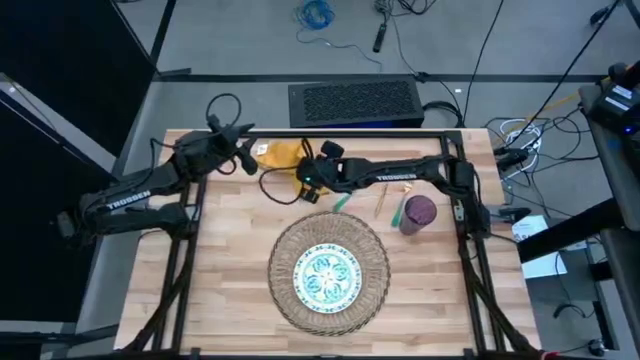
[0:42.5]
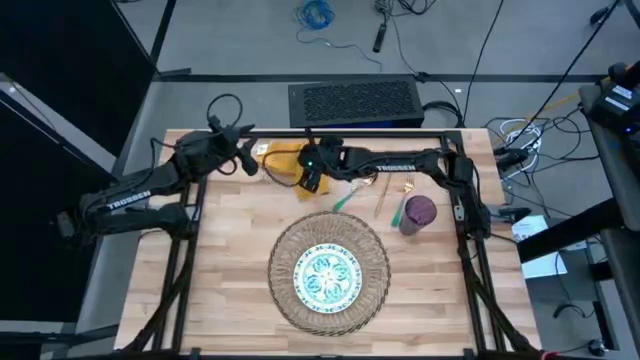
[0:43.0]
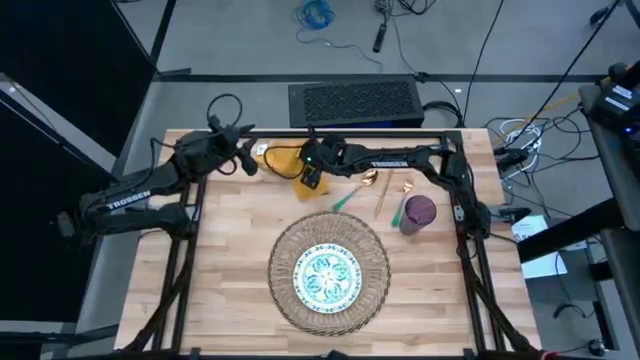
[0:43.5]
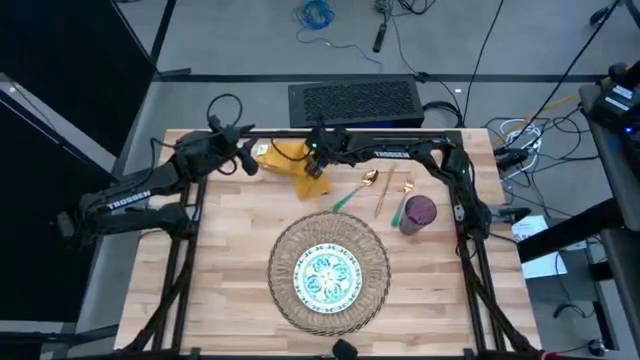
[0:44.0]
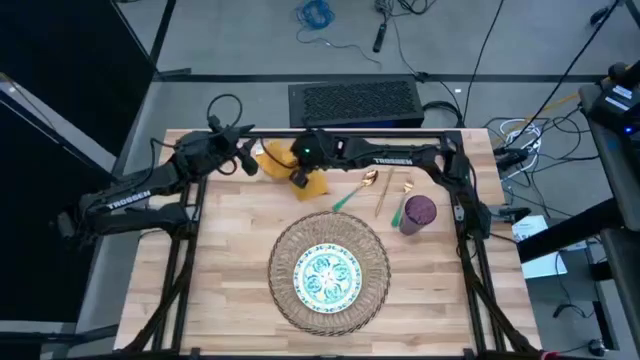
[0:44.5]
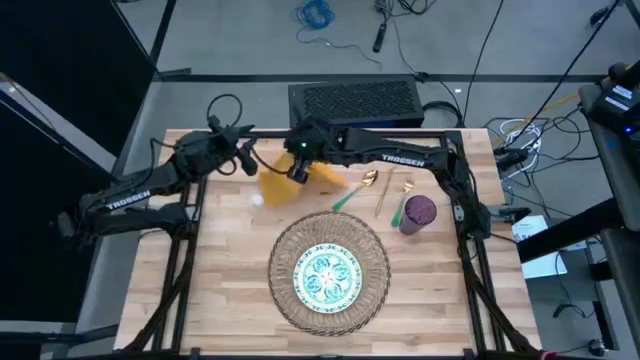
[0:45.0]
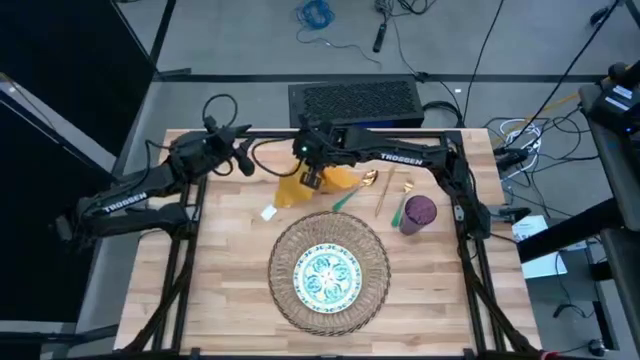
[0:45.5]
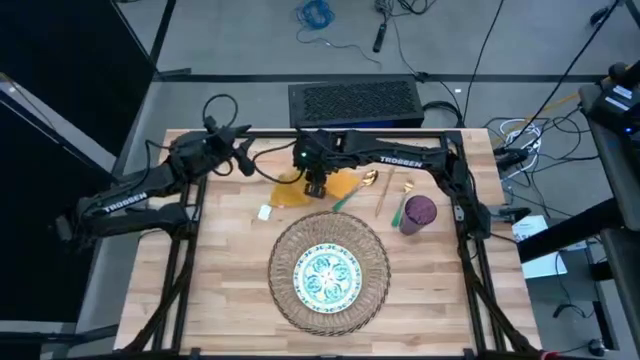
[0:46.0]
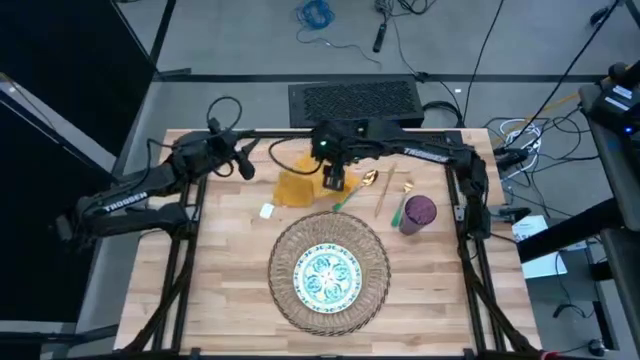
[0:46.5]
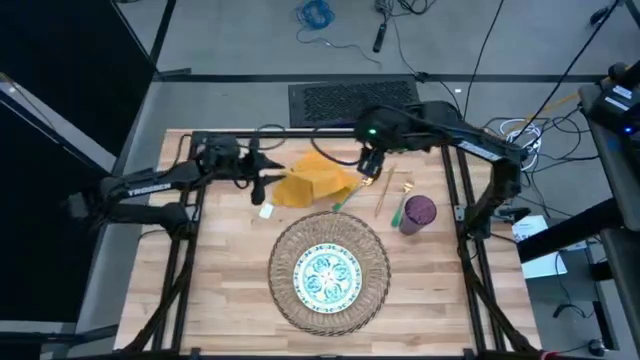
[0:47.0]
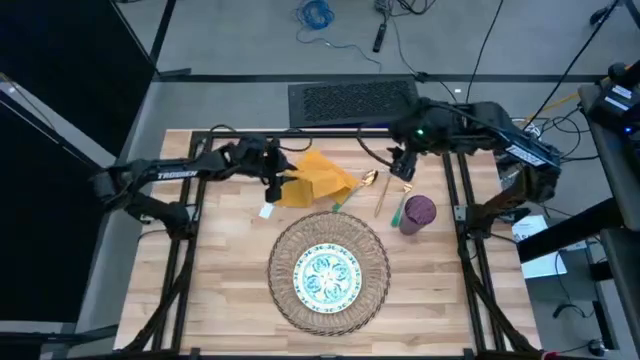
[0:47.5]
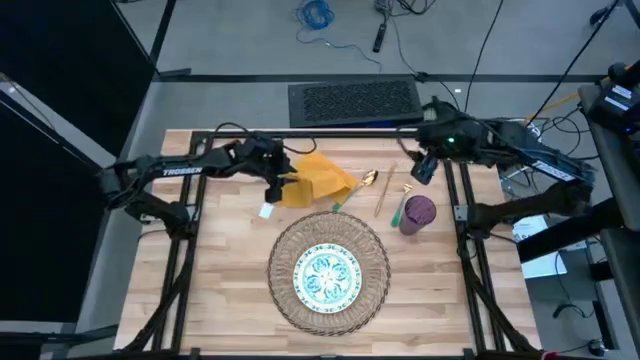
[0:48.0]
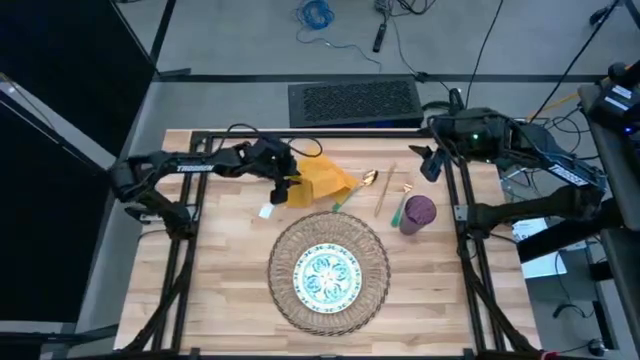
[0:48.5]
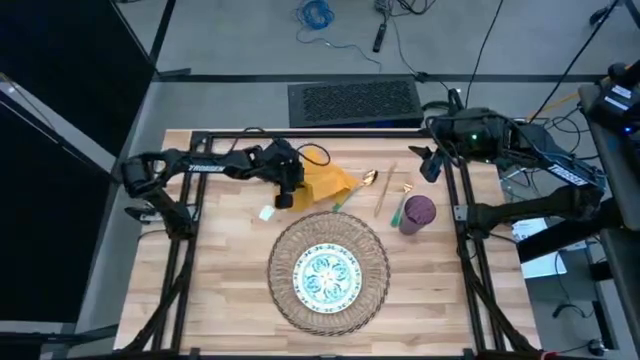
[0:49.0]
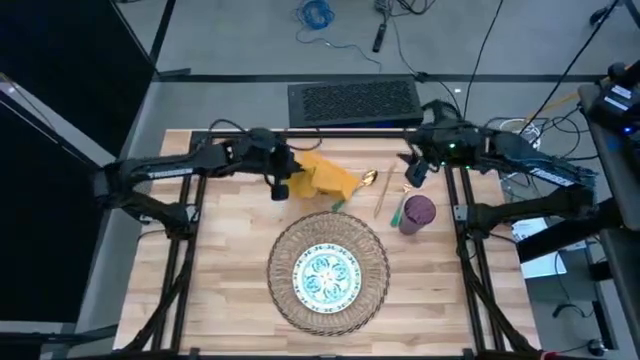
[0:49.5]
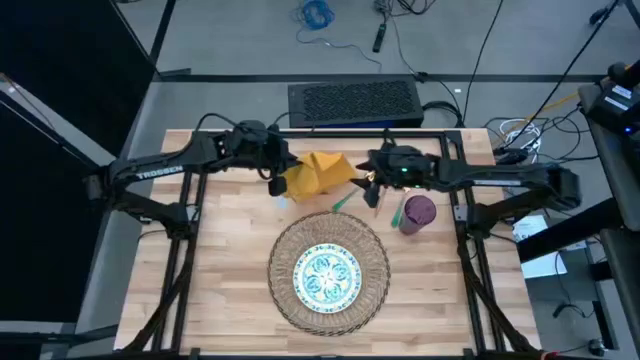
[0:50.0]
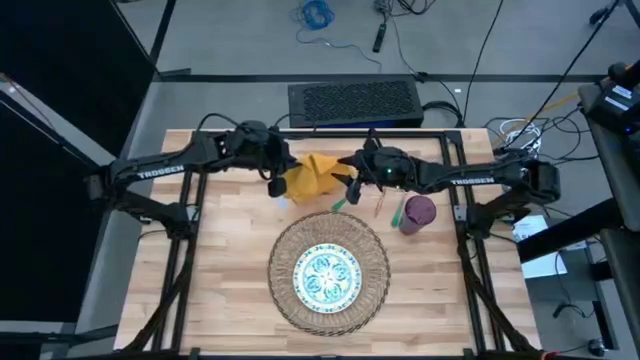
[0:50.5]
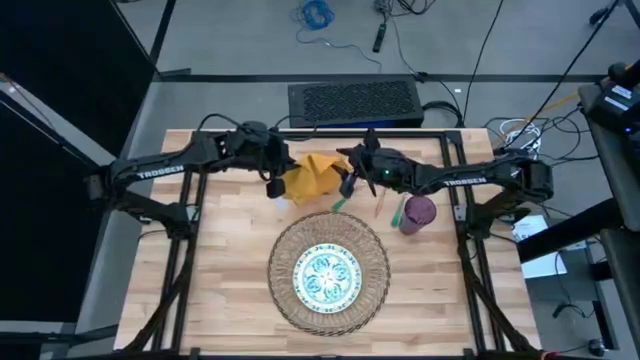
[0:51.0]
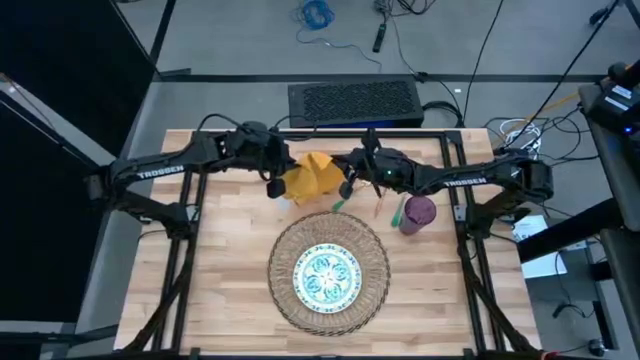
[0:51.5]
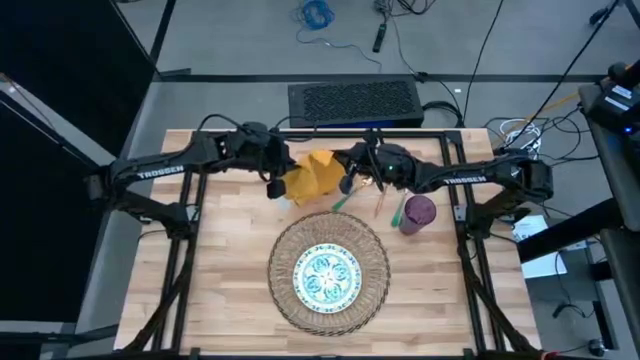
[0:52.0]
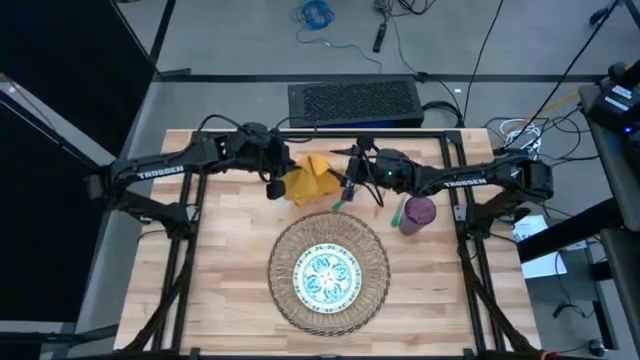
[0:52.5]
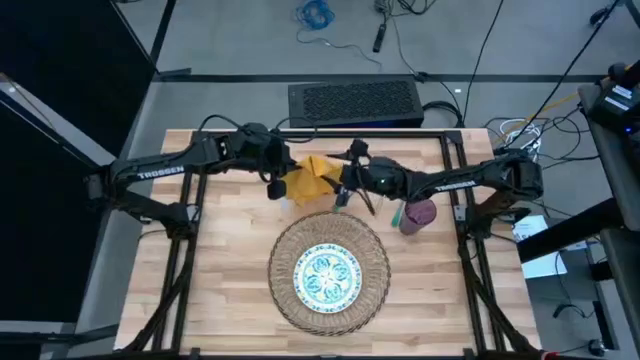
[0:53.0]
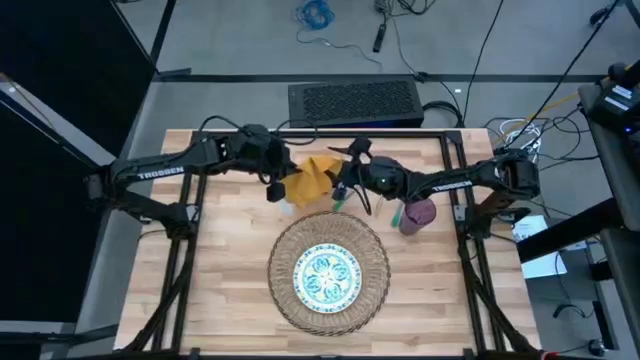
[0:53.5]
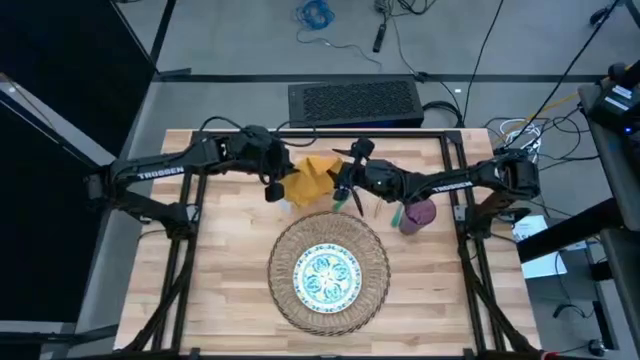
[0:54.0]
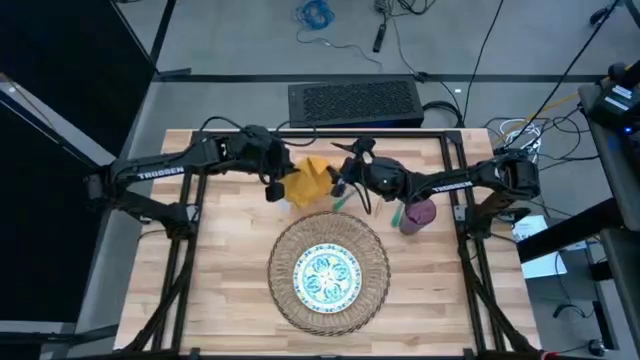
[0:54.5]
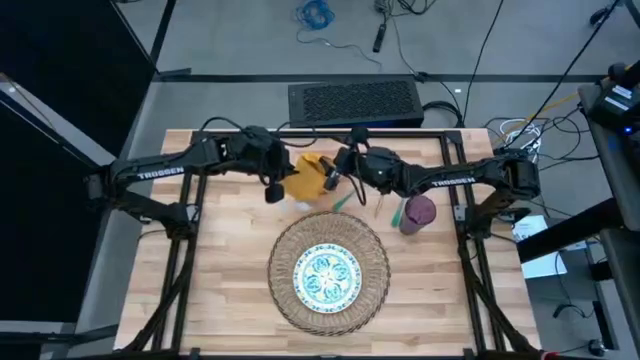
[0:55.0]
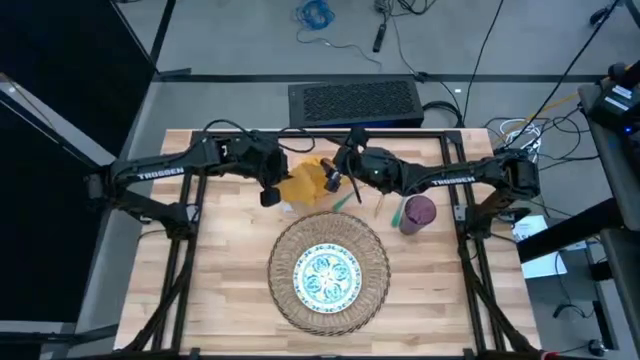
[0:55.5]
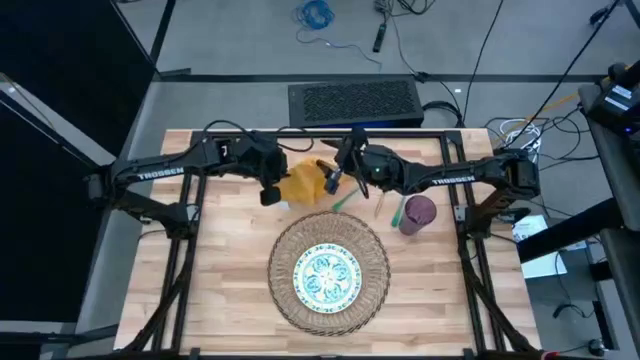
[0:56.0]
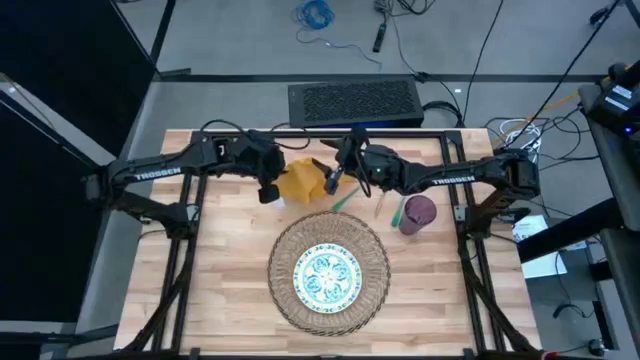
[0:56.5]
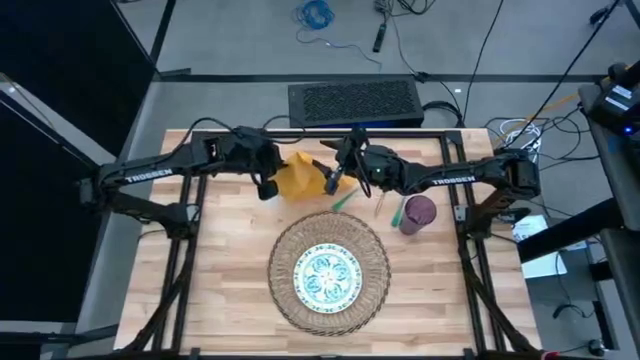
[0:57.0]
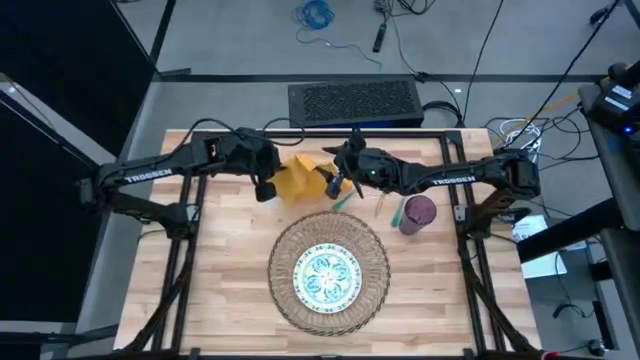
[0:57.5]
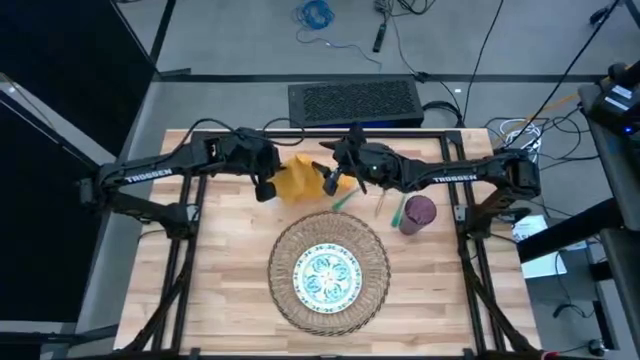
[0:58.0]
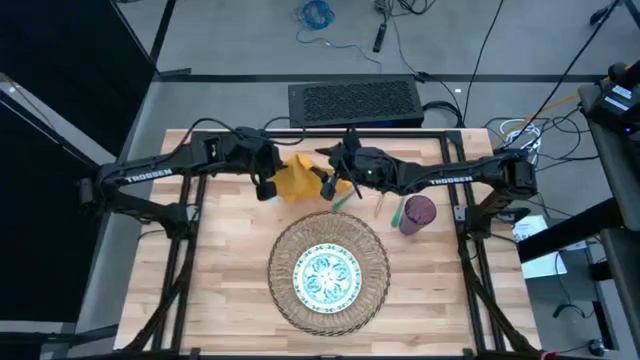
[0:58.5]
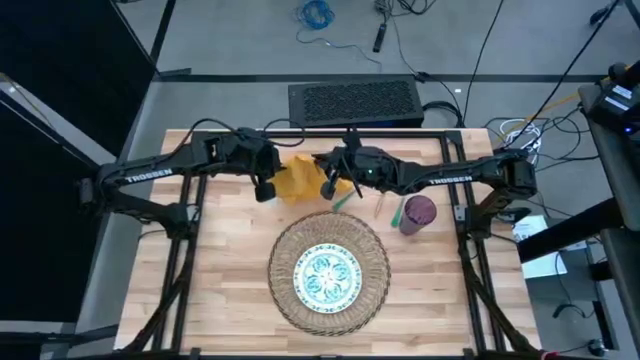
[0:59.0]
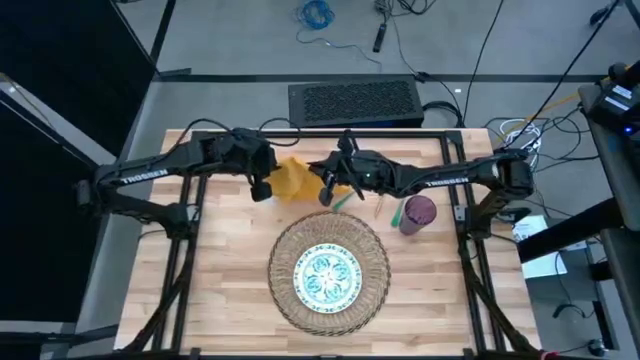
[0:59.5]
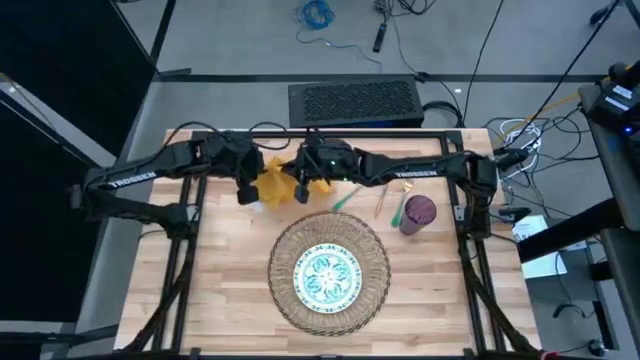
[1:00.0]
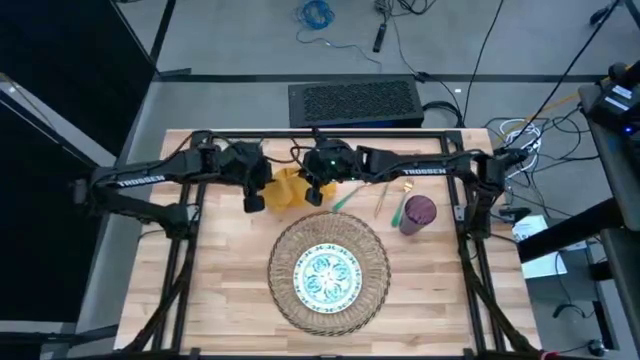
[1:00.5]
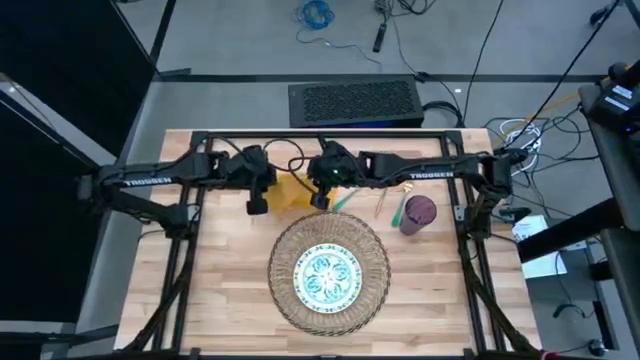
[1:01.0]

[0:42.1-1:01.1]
Task: Set table place
Fold the yellow table napkin
